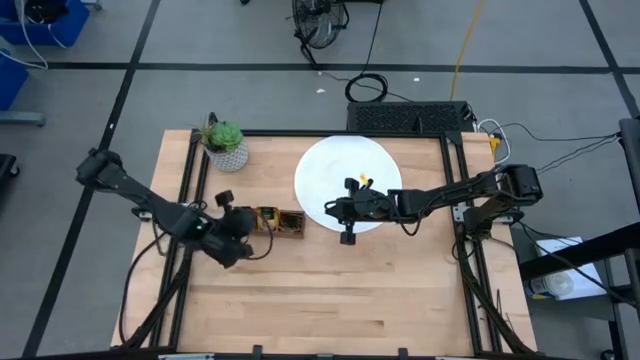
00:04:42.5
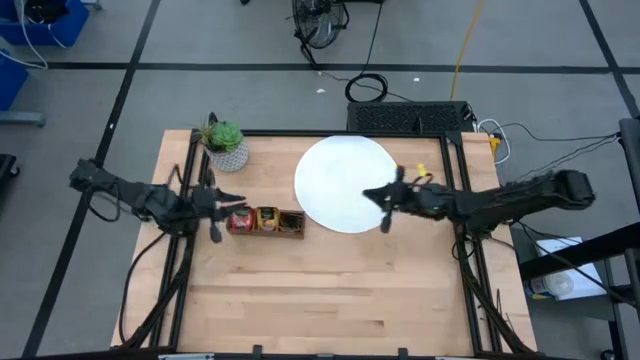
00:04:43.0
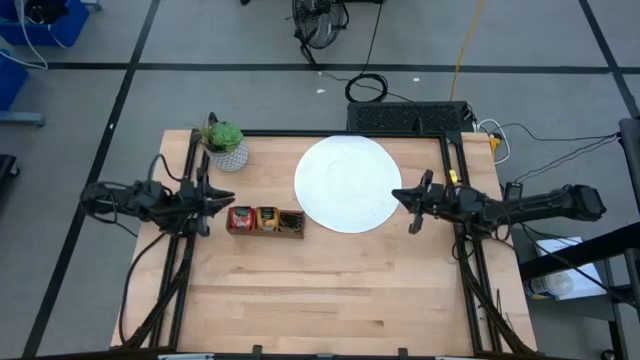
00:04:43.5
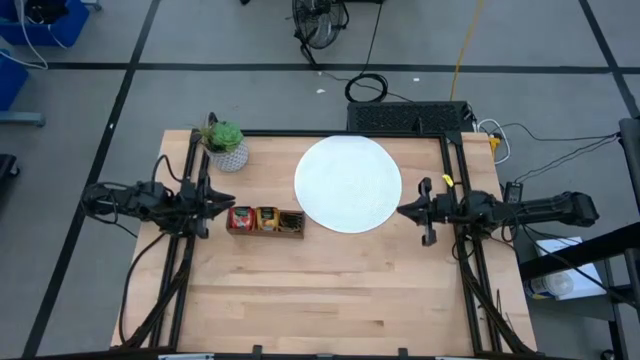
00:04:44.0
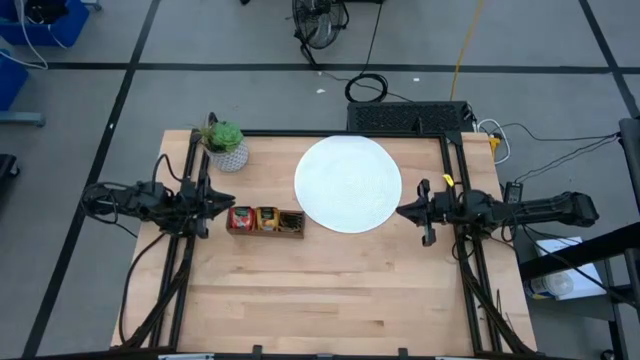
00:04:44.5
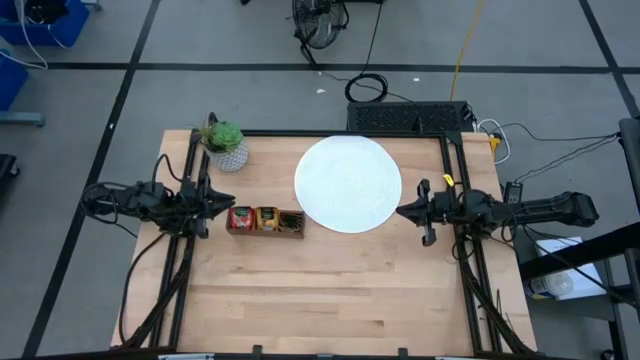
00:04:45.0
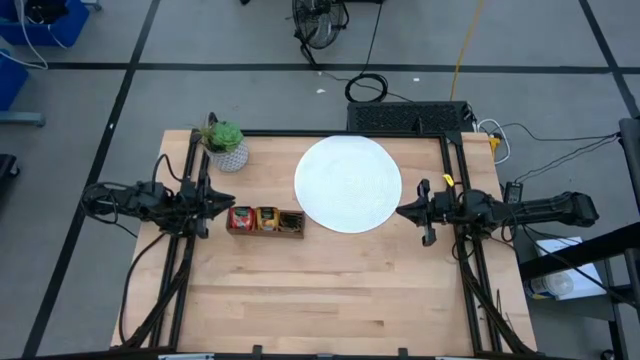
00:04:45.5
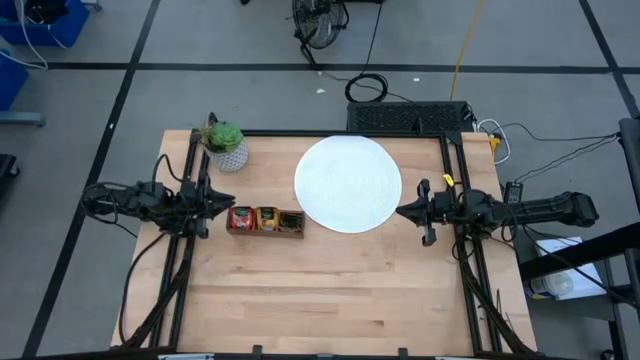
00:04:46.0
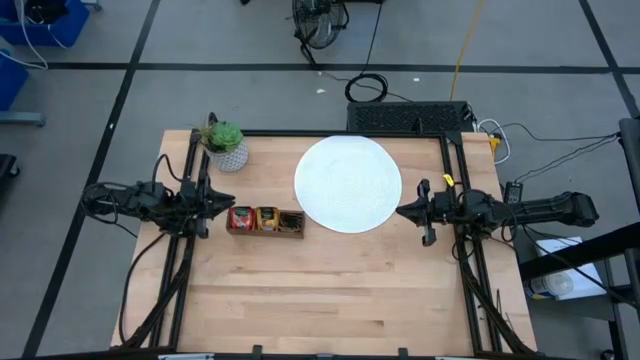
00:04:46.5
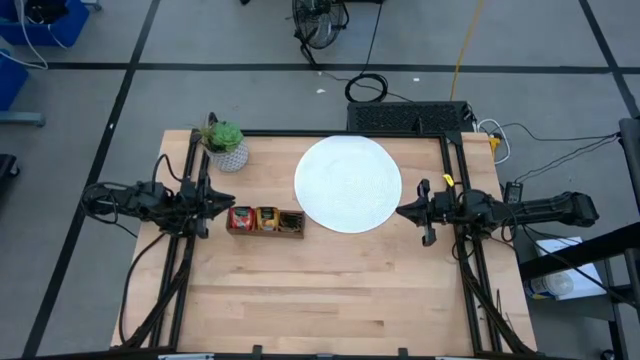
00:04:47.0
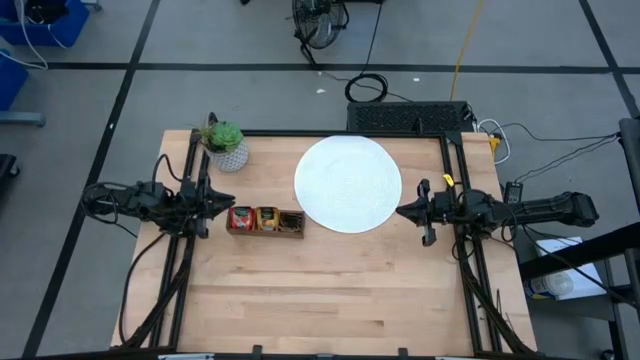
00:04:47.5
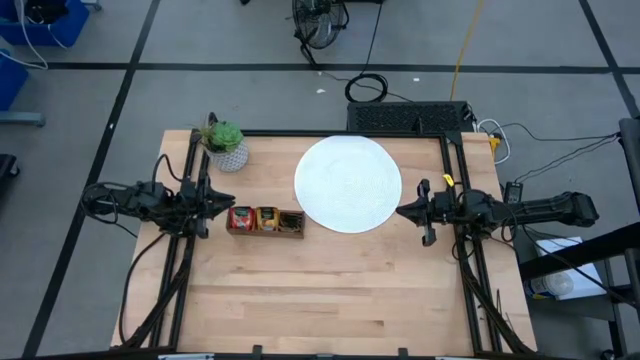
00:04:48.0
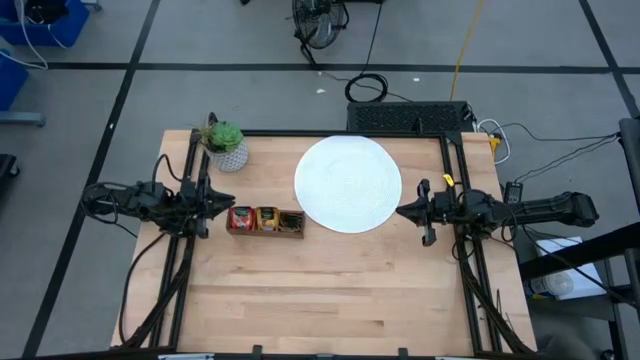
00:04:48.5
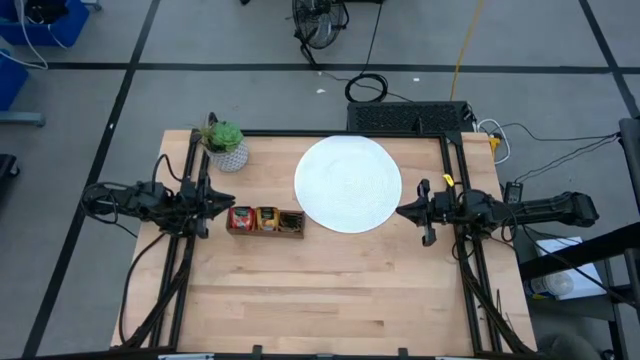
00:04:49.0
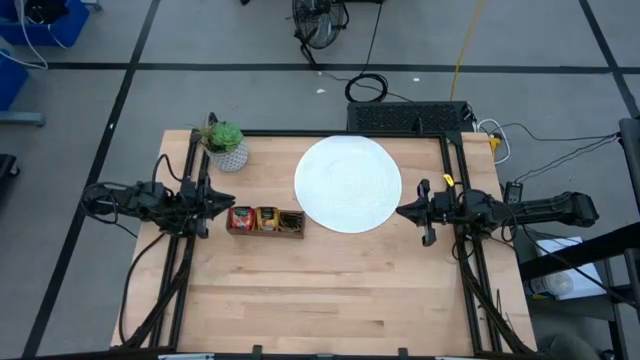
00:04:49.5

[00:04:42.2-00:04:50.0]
Task: Pick & Place Tea
Return to Home Position

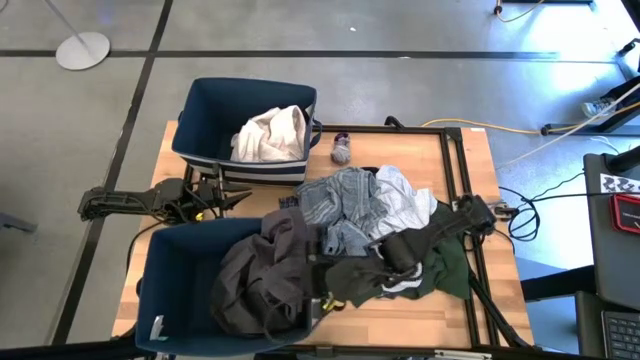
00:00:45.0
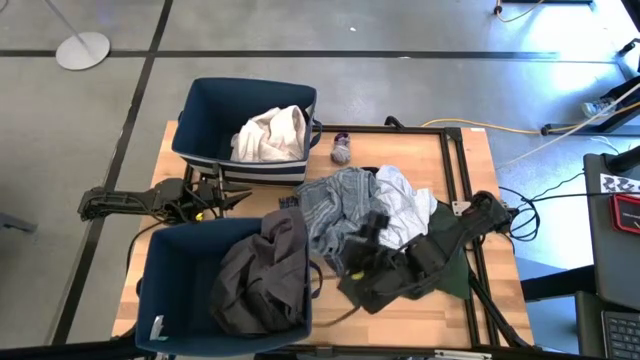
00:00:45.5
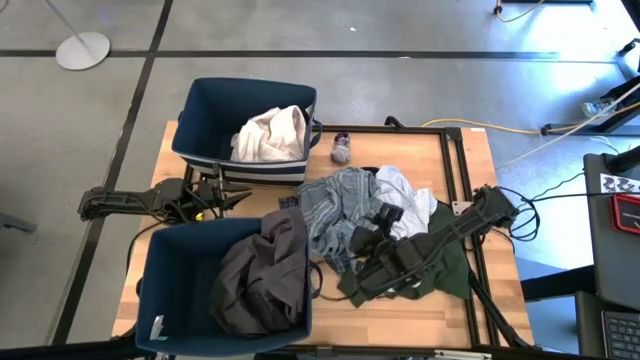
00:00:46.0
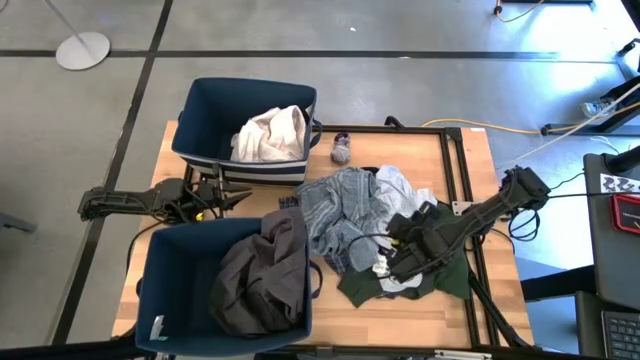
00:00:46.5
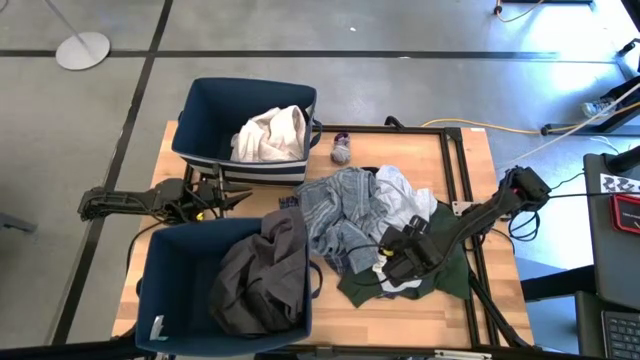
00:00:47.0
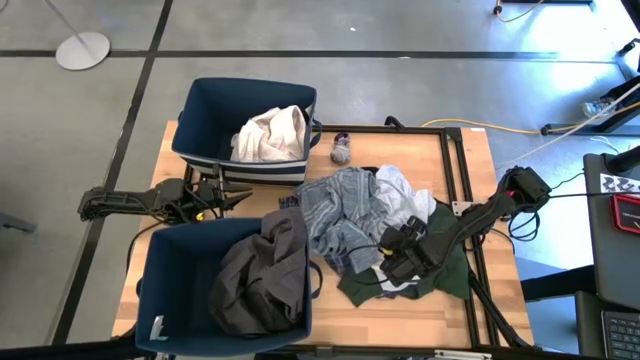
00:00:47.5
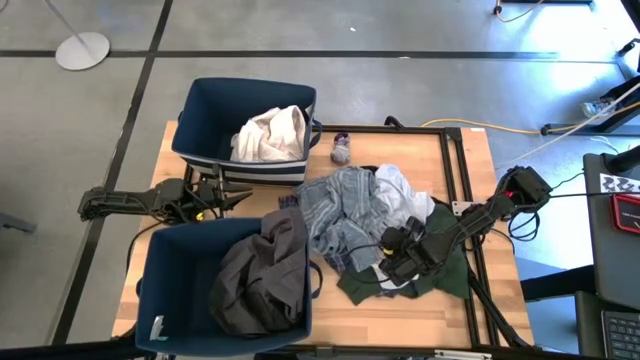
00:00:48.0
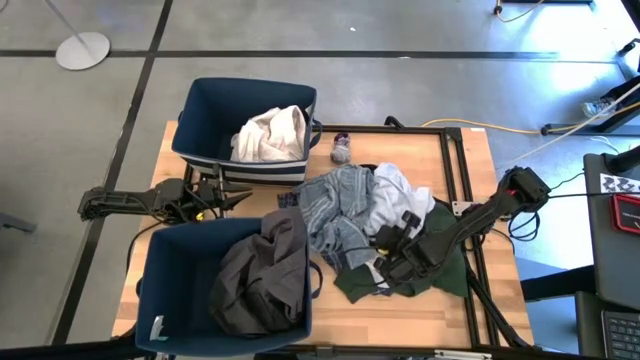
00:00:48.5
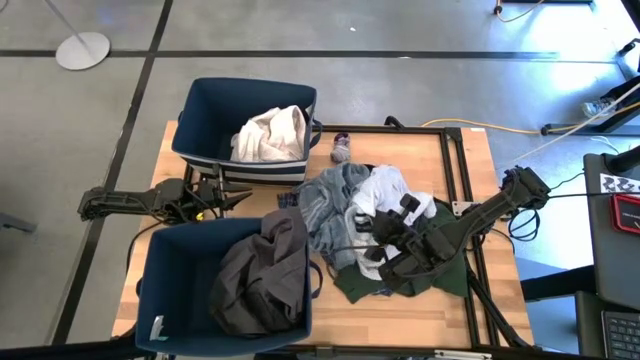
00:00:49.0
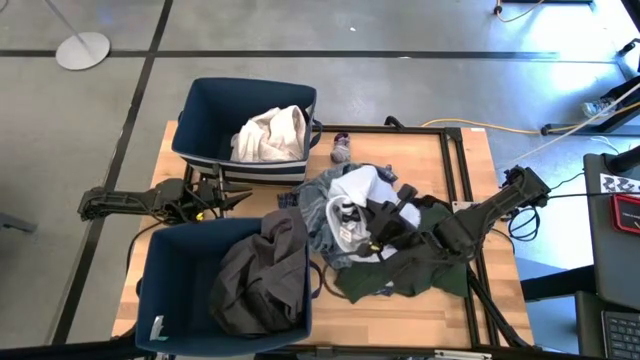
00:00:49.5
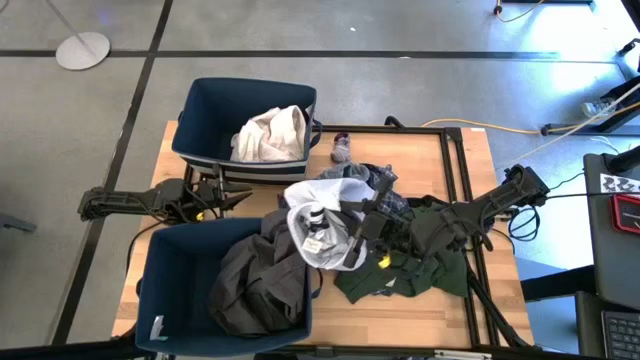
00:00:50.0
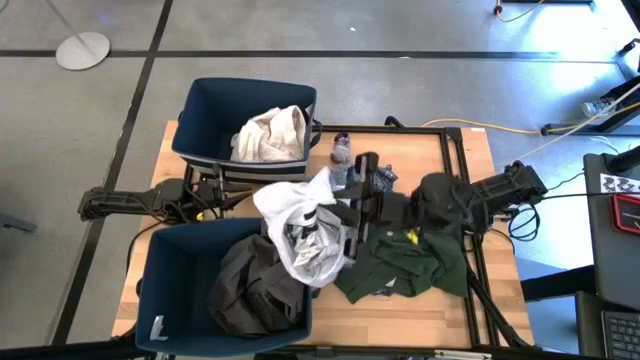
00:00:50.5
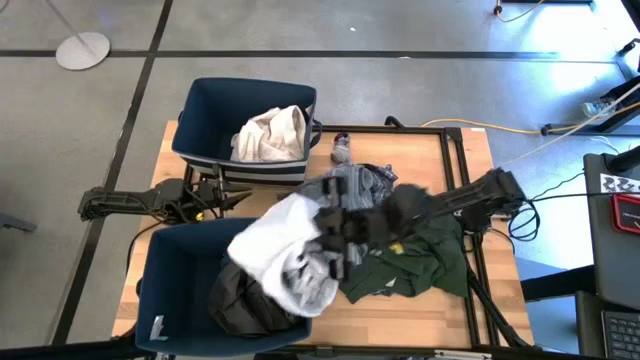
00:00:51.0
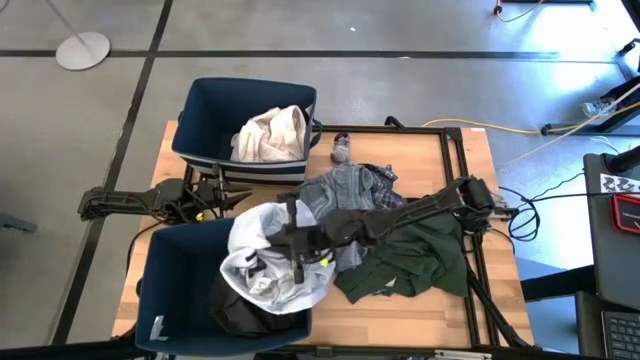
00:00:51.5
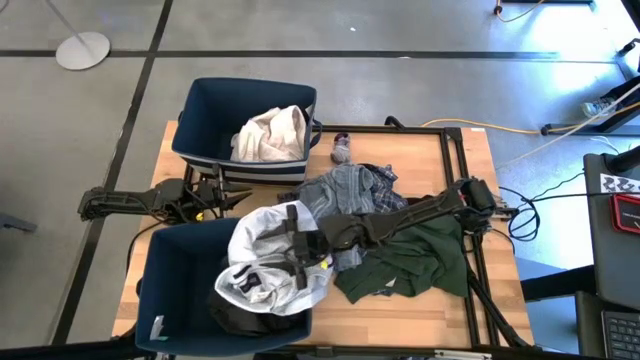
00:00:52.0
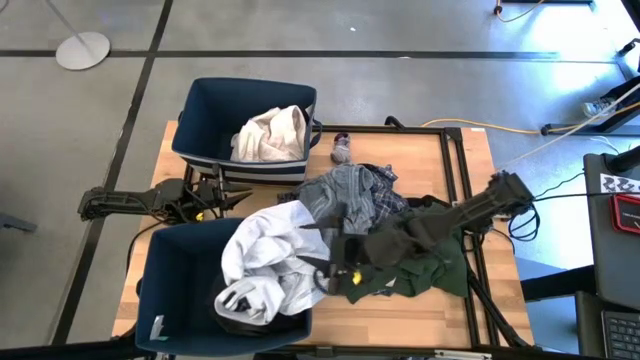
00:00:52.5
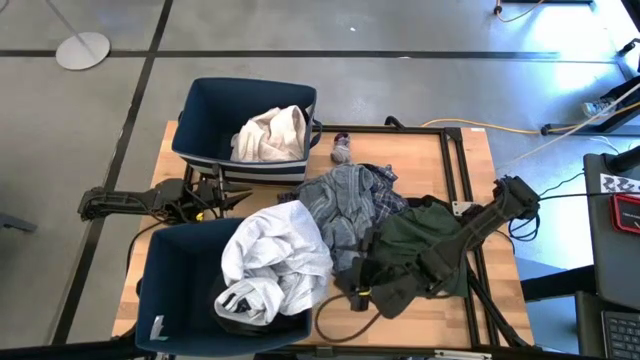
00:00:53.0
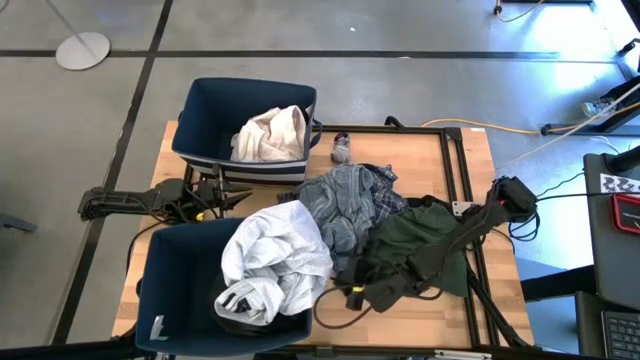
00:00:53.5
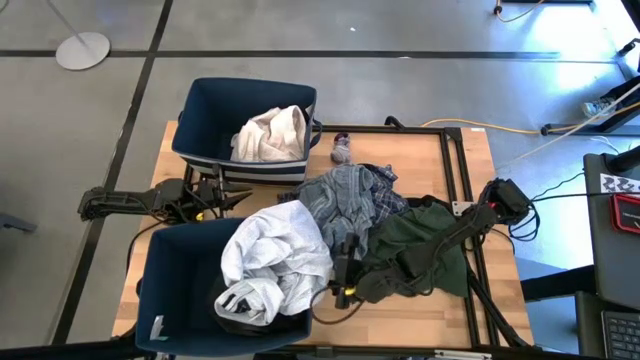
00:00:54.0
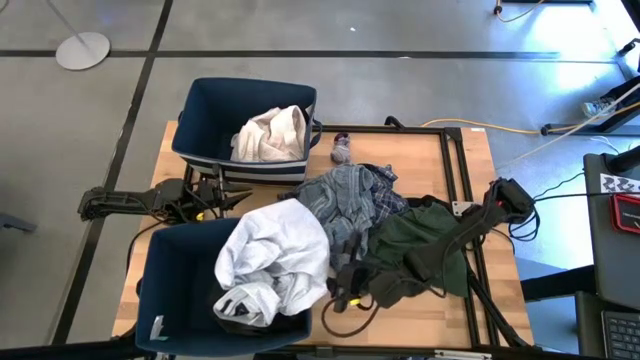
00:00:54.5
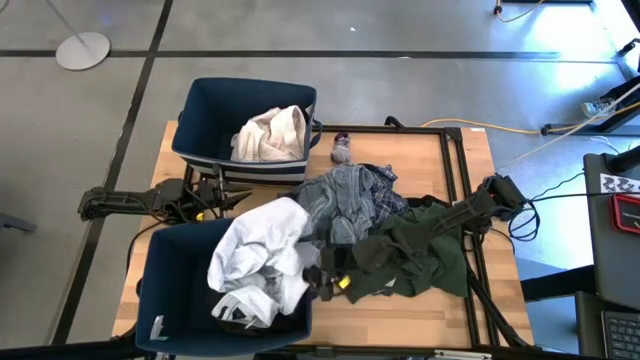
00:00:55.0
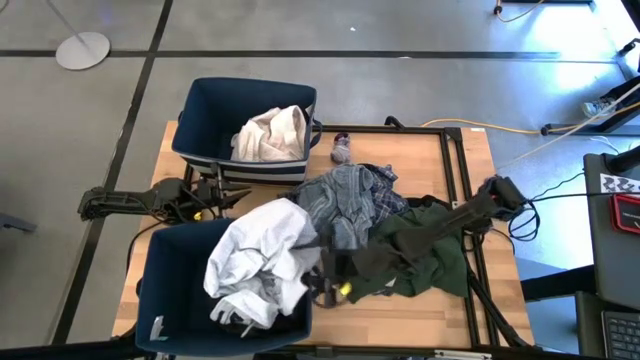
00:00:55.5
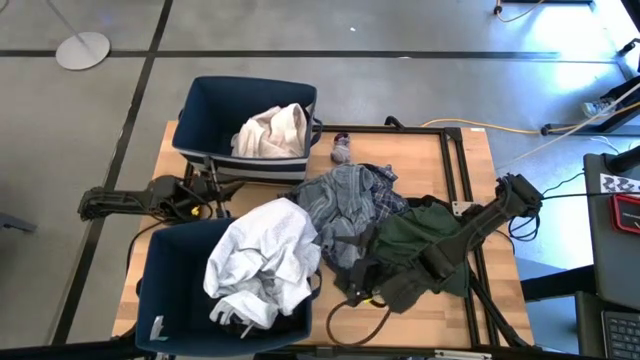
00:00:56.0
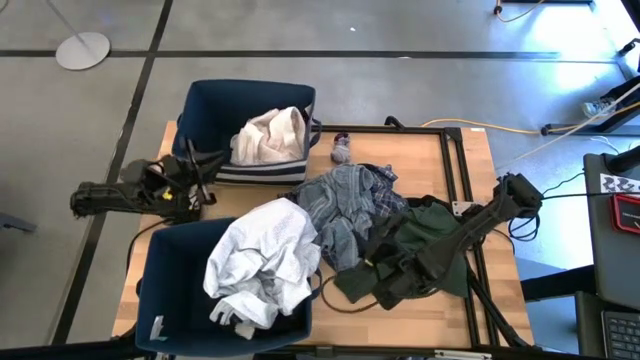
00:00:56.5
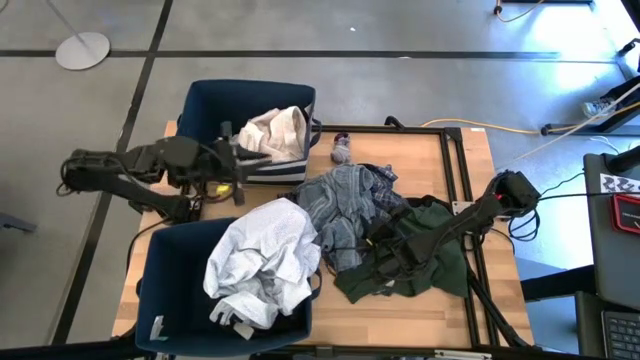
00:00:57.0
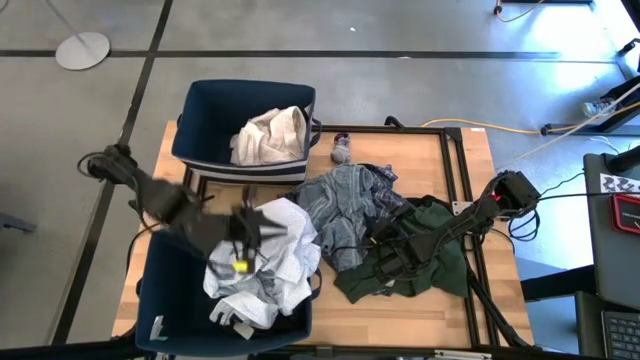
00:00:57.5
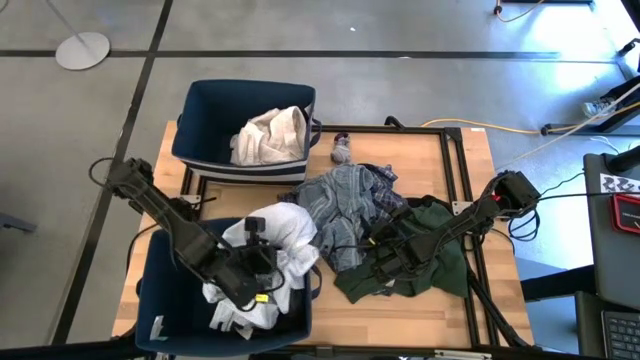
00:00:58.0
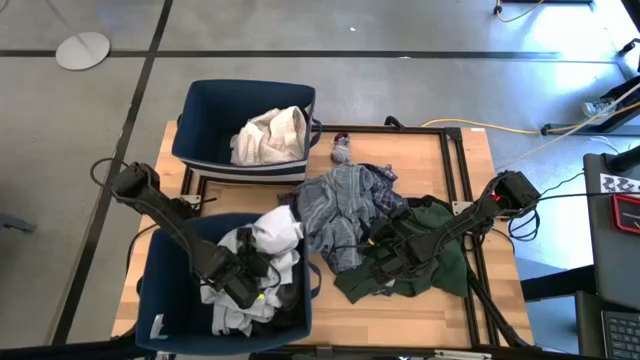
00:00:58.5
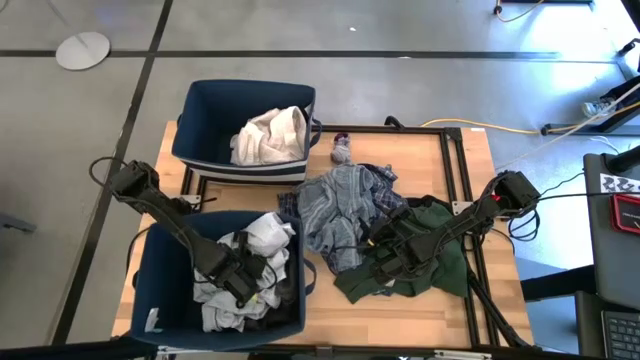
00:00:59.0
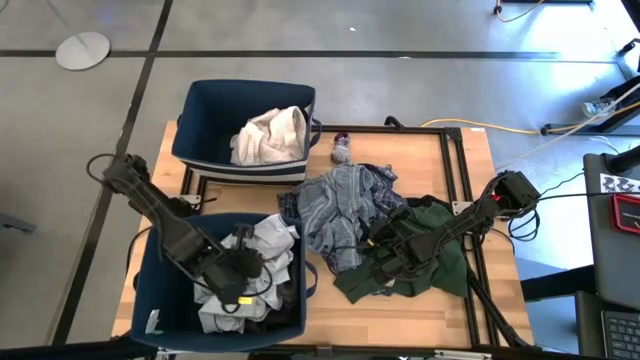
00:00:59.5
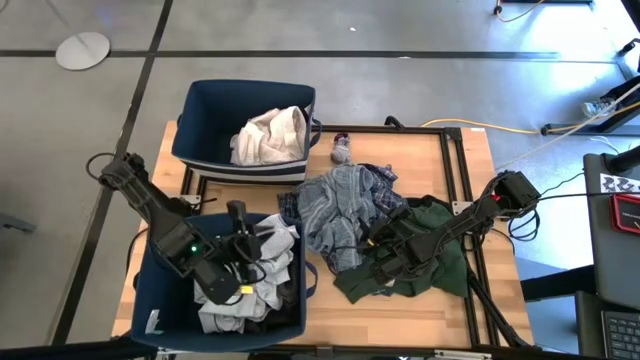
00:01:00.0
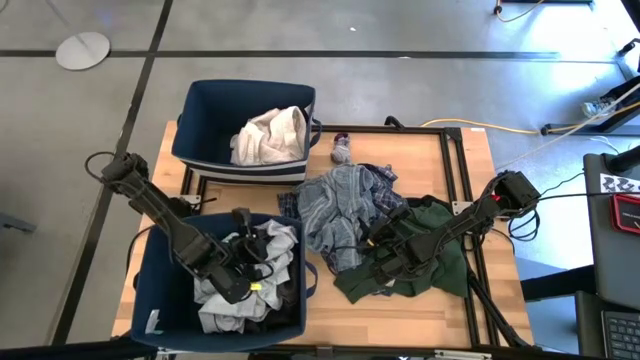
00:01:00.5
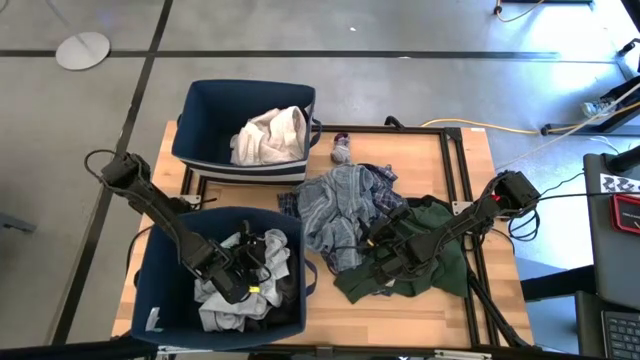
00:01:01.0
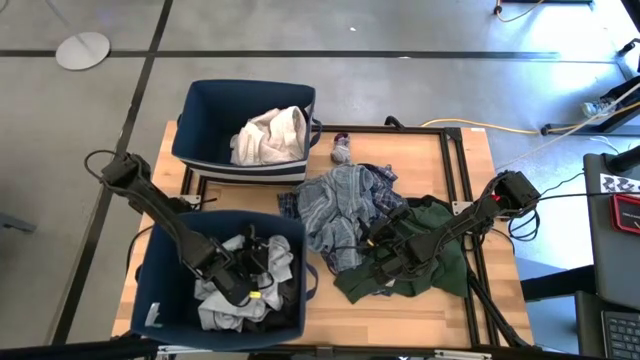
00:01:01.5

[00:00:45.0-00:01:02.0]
Task: Sort clothes
Put the light blue patient gown into the bottom blue laundry organizer
